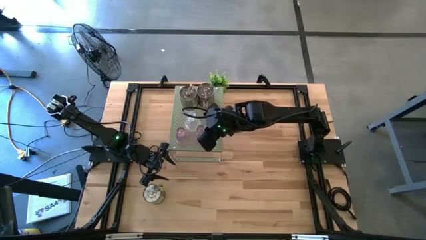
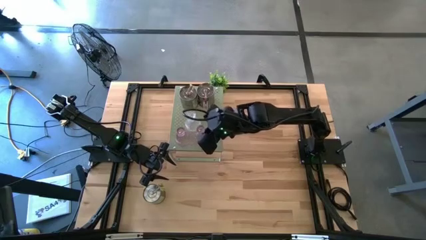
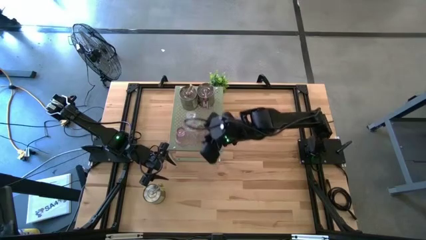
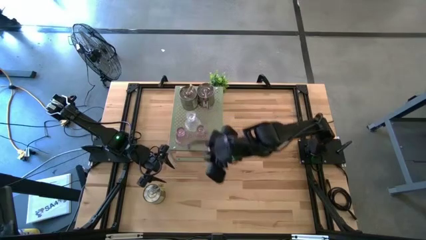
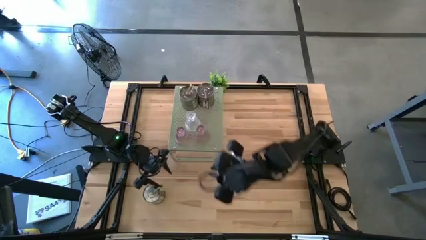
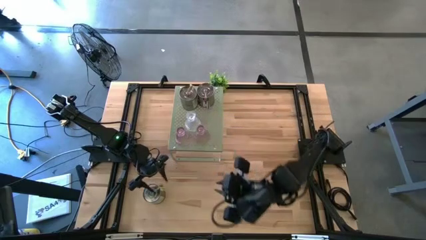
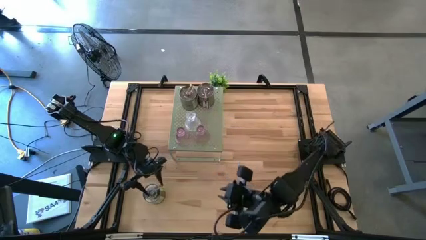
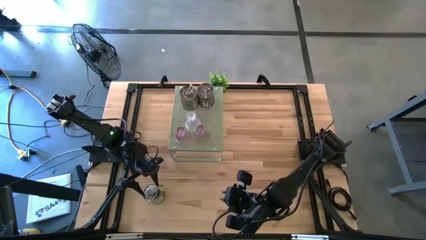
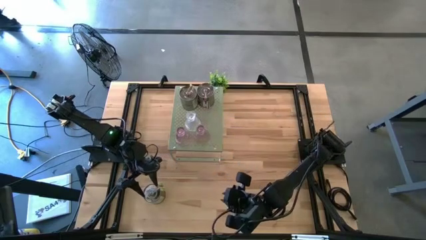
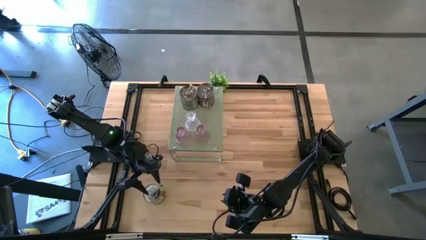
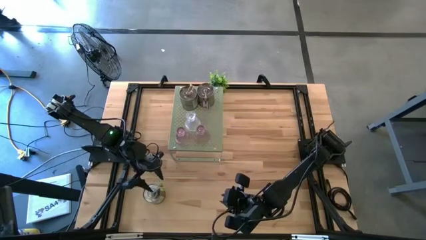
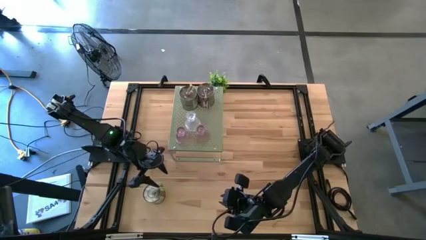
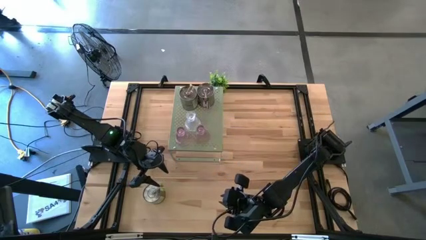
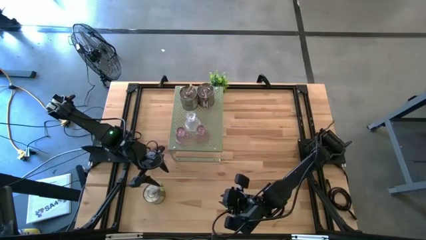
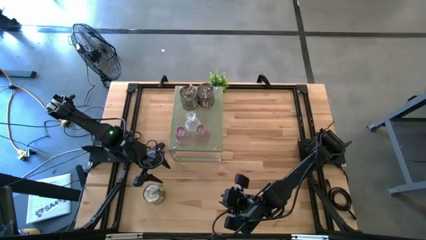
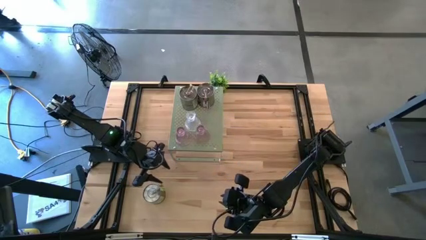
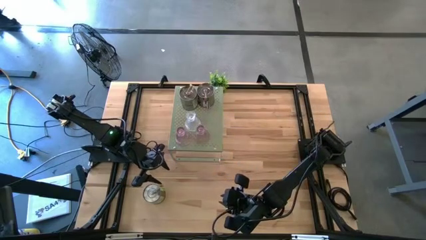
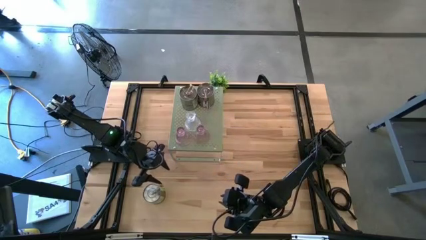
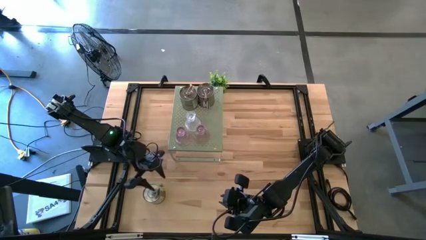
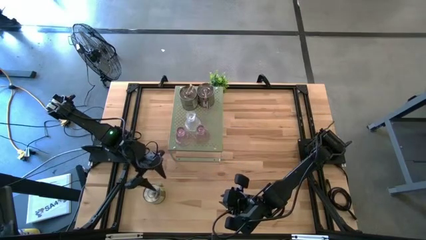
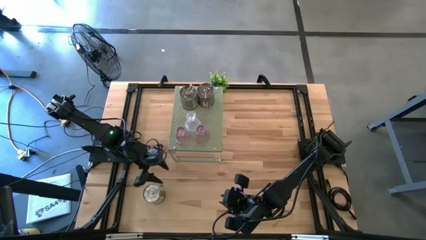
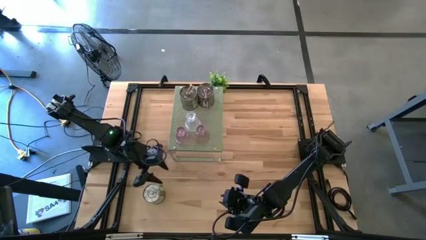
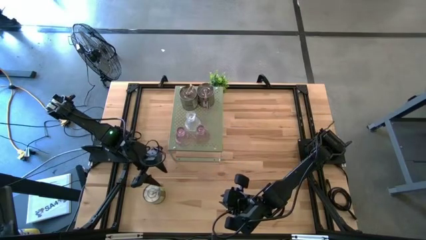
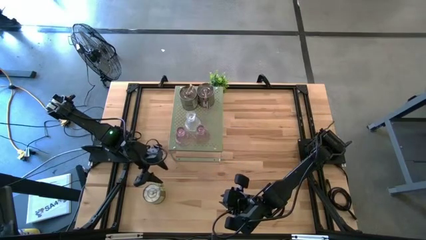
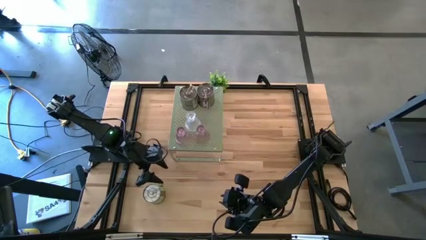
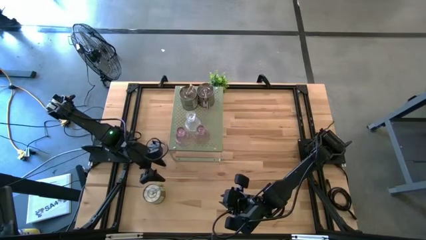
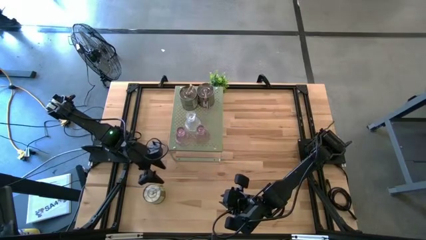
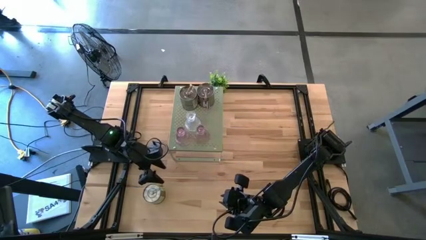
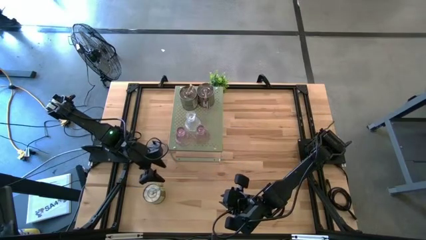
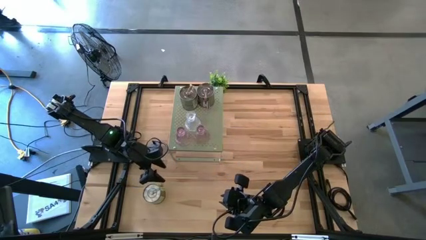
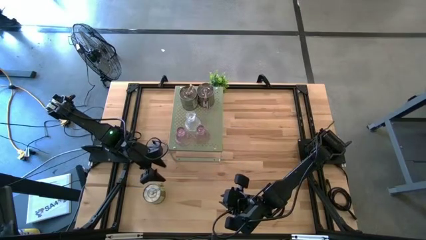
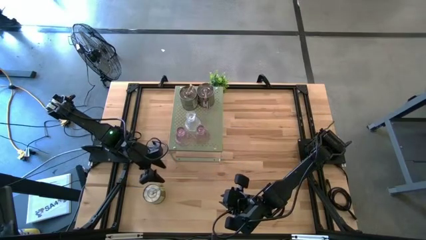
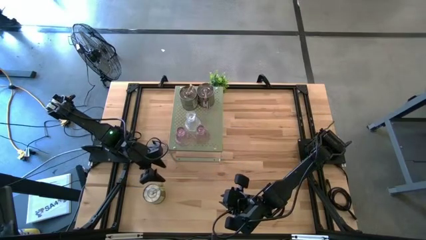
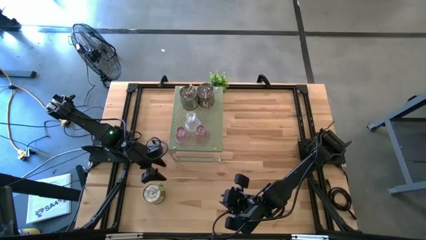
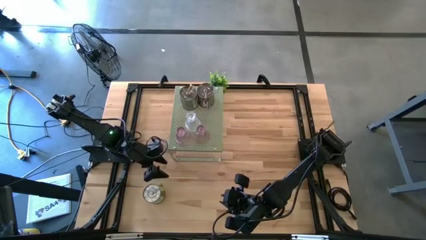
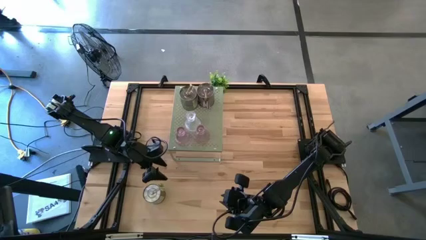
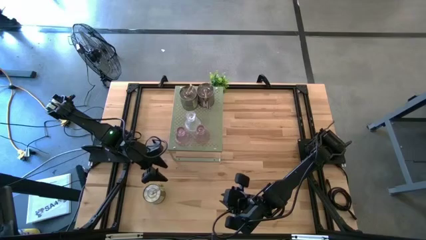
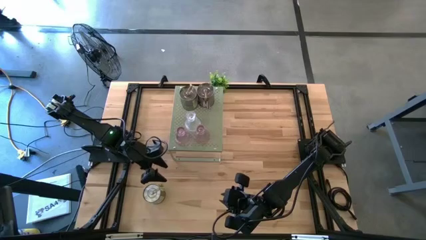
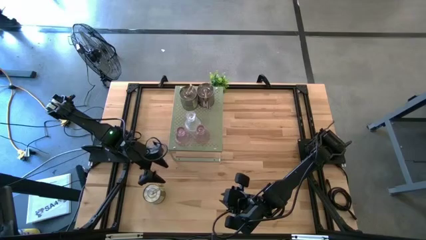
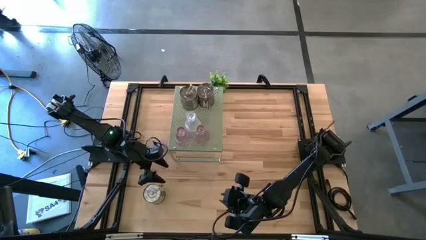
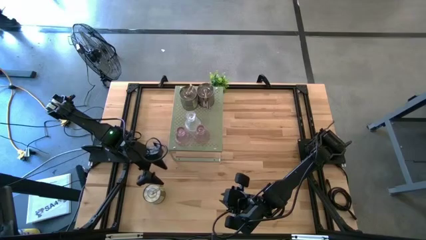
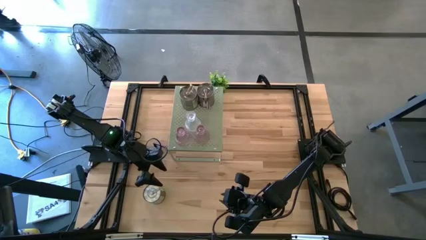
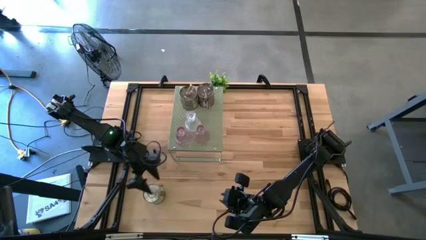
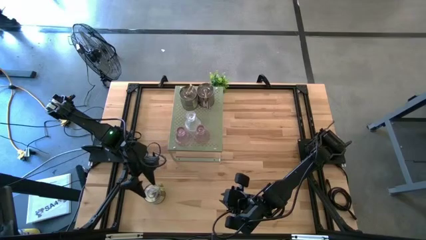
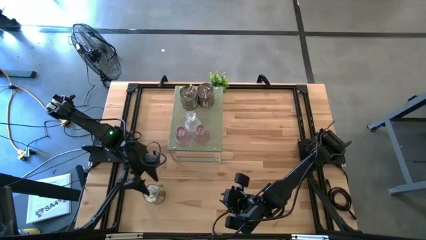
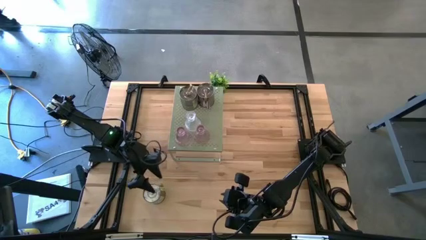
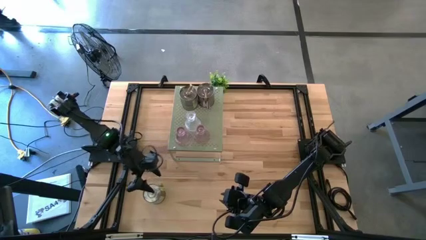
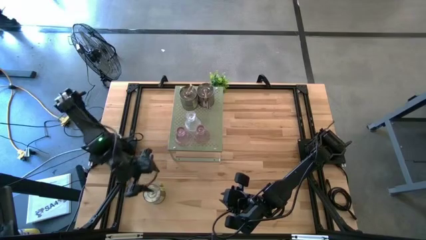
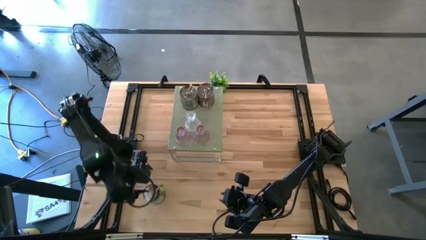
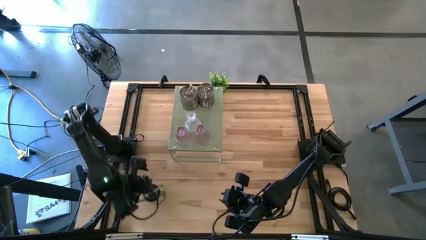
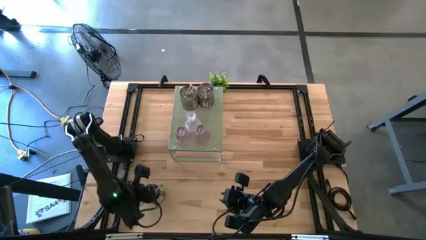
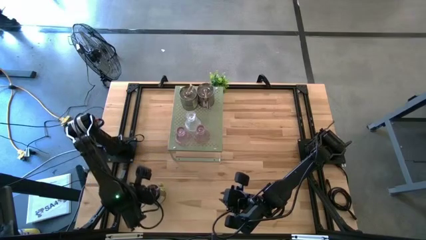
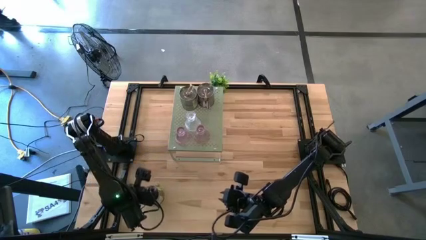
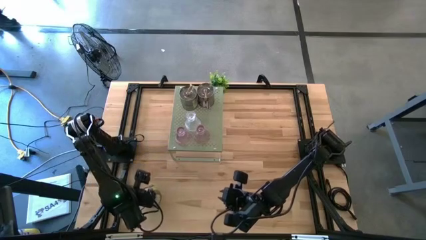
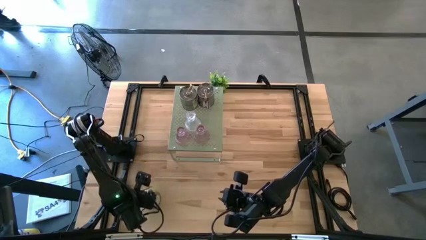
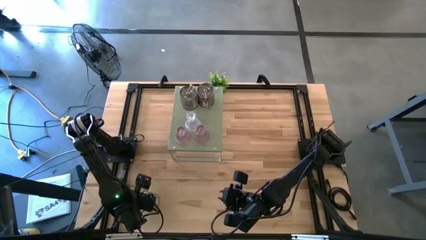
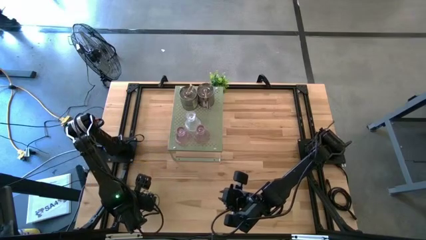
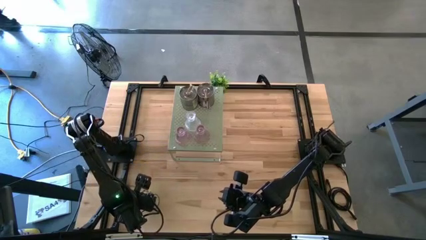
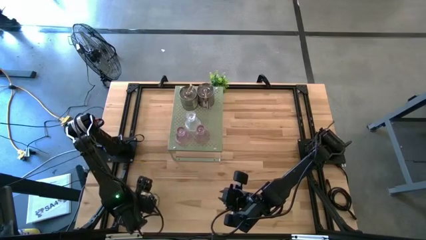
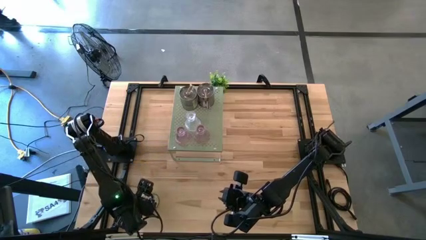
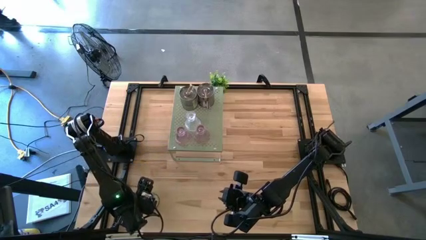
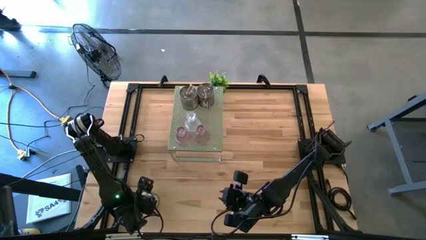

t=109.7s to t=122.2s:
Task: Pick & Place candle stick holders
Put the brown scented candle on the shelf

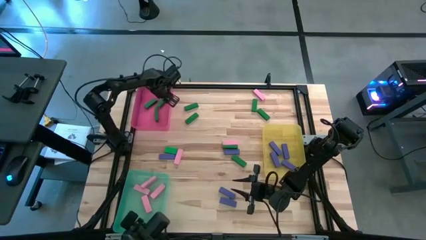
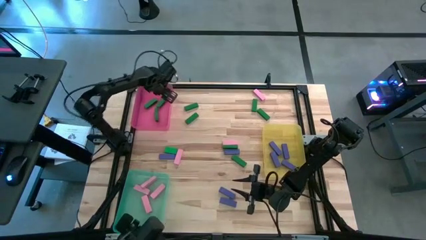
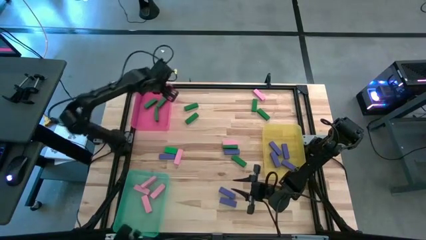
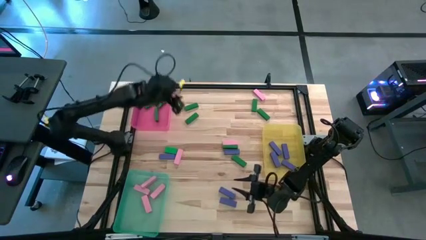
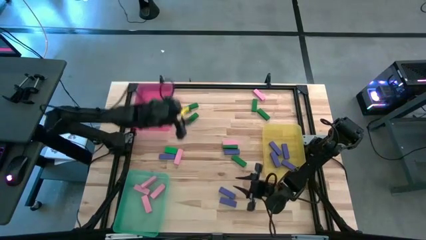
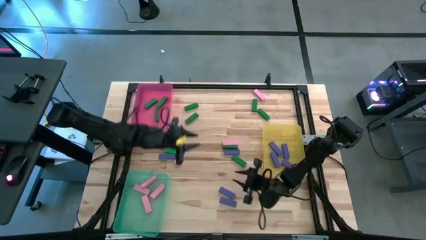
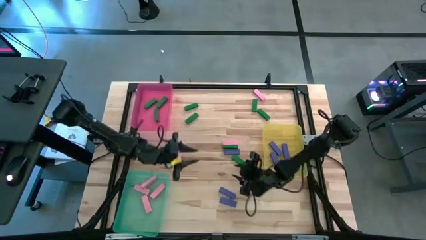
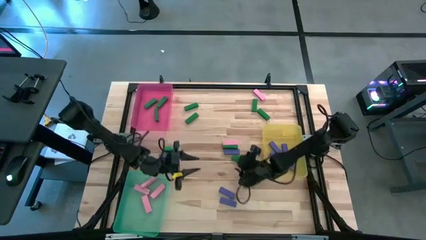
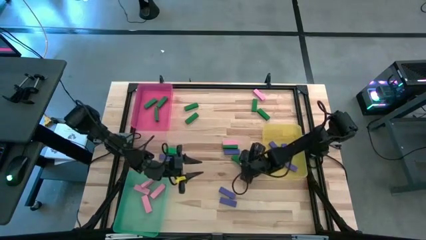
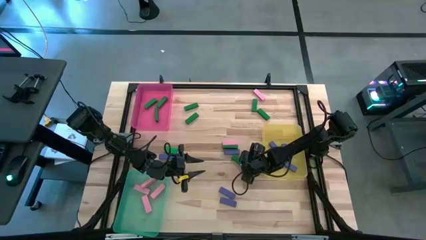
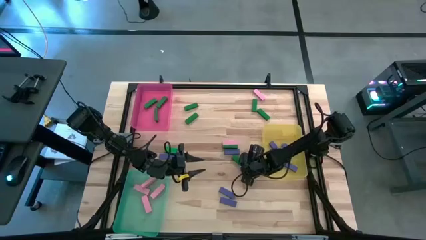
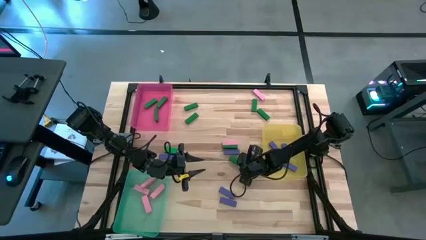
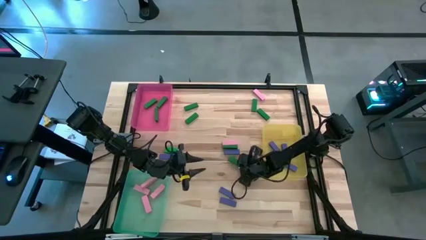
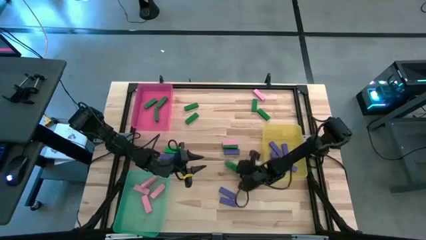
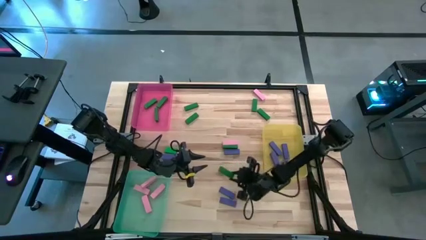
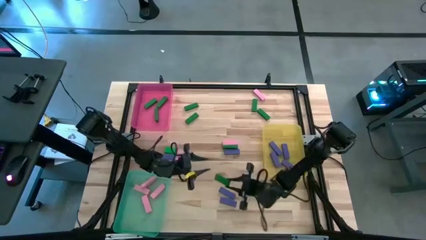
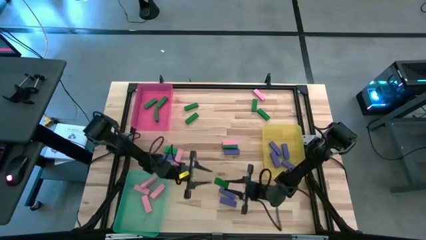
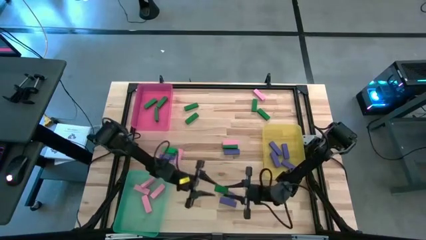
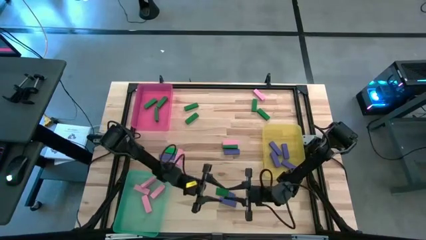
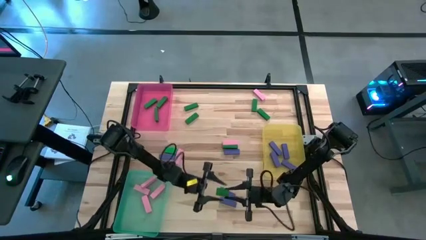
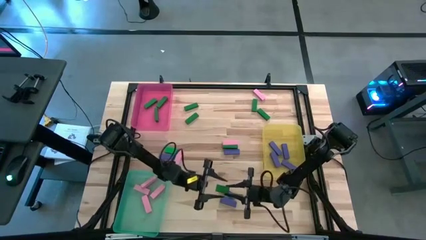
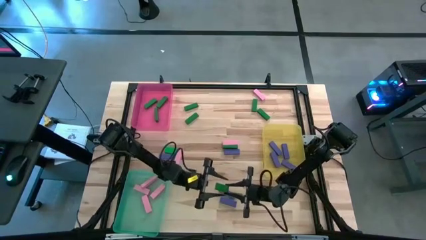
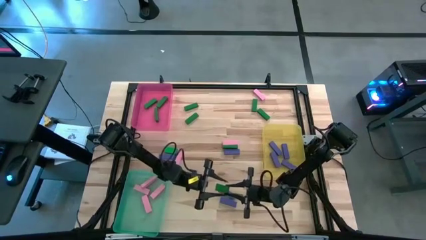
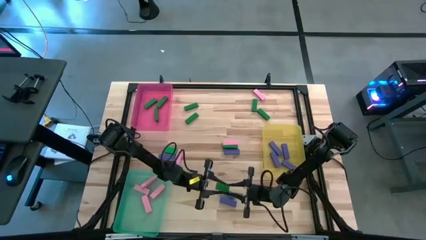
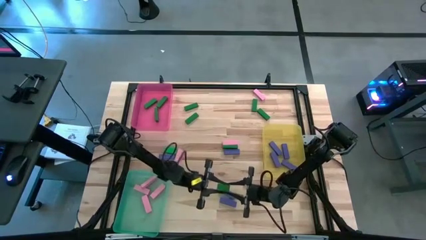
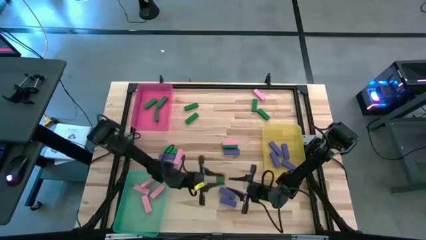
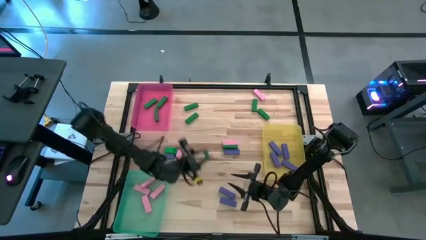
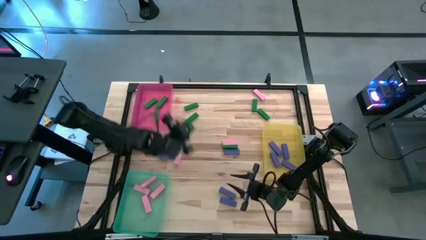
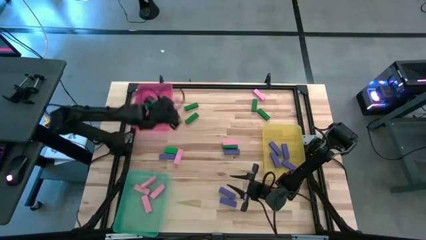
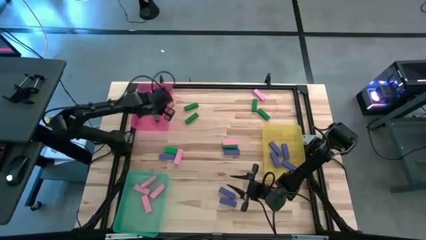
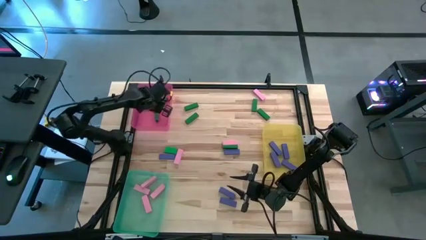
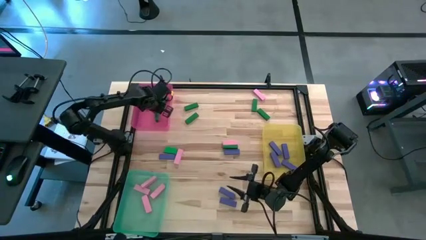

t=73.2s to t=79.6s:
Task: Sort blocks
Put the green block into the pink bin
